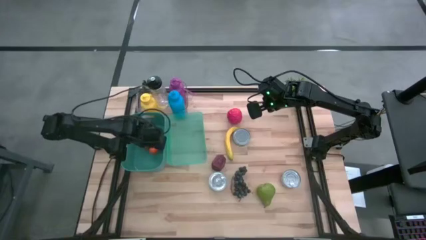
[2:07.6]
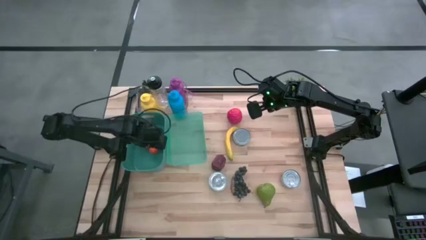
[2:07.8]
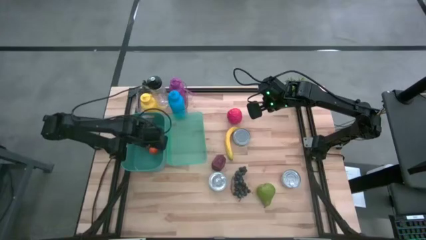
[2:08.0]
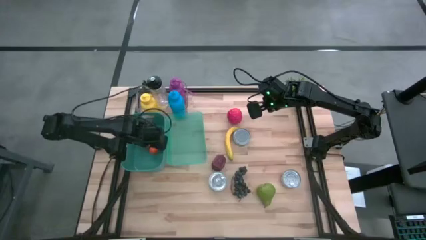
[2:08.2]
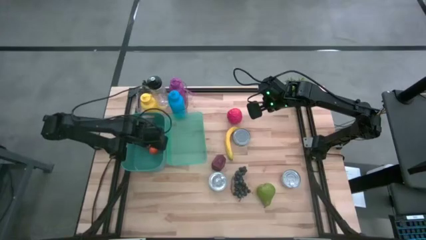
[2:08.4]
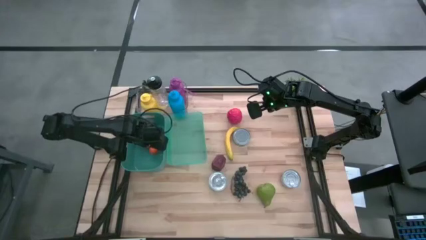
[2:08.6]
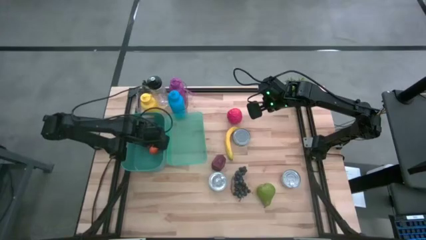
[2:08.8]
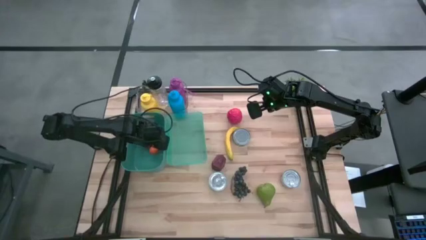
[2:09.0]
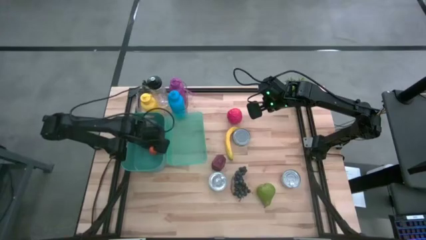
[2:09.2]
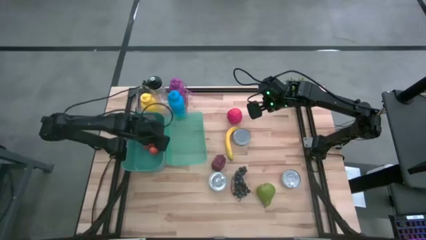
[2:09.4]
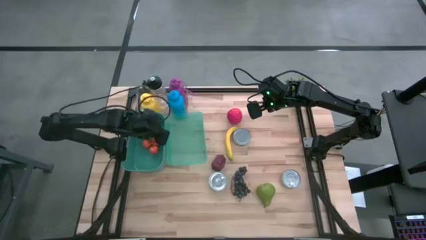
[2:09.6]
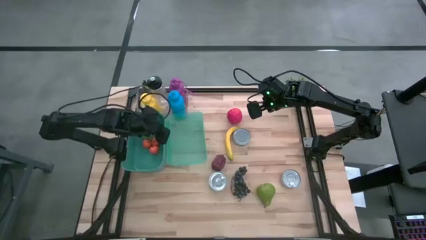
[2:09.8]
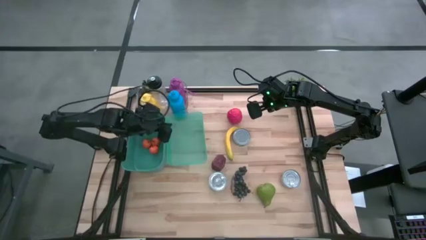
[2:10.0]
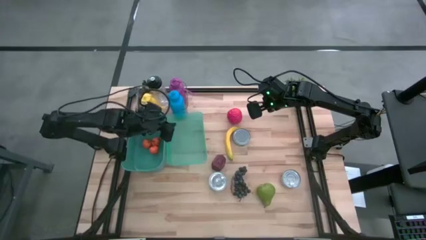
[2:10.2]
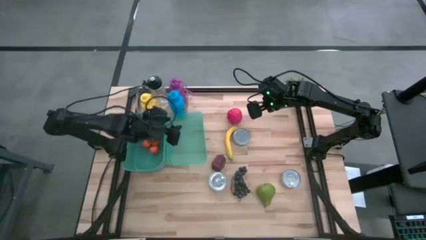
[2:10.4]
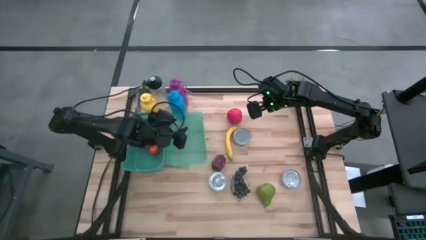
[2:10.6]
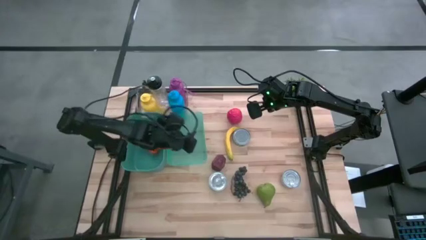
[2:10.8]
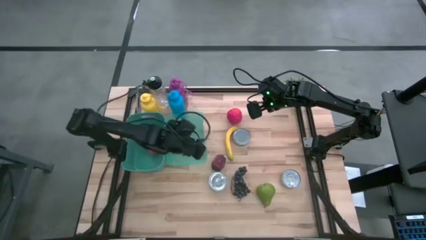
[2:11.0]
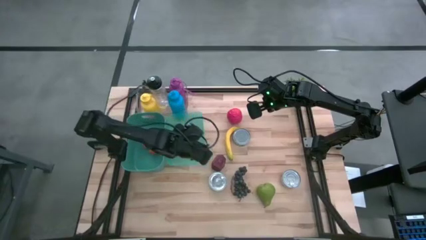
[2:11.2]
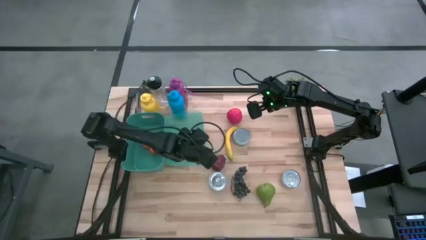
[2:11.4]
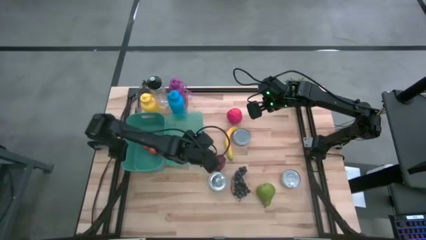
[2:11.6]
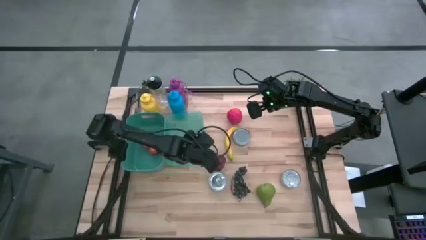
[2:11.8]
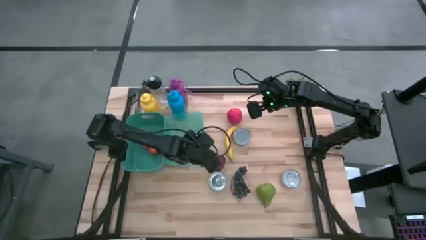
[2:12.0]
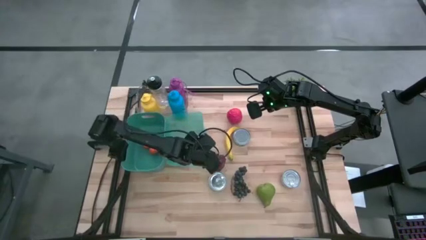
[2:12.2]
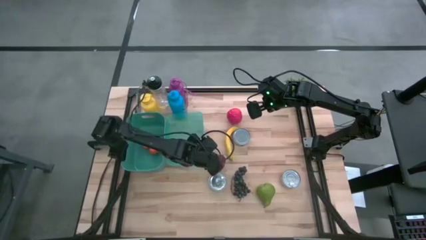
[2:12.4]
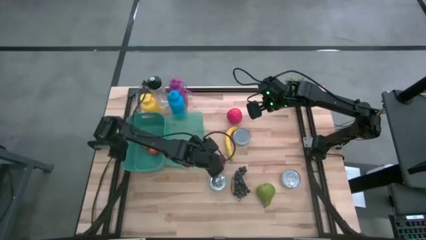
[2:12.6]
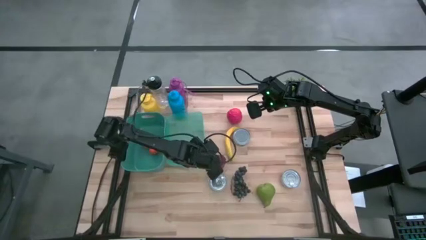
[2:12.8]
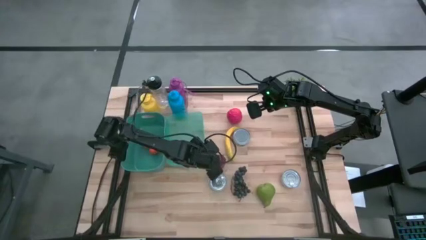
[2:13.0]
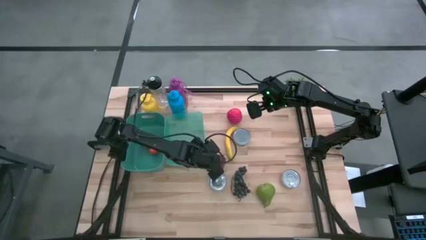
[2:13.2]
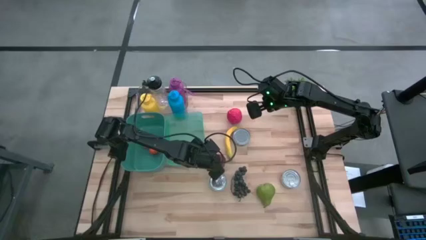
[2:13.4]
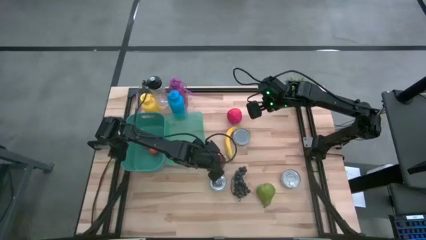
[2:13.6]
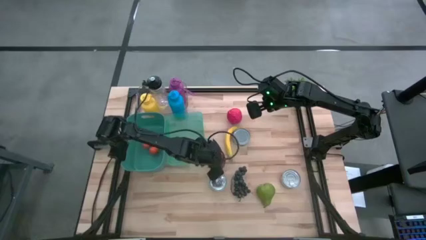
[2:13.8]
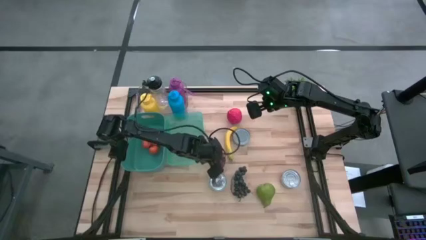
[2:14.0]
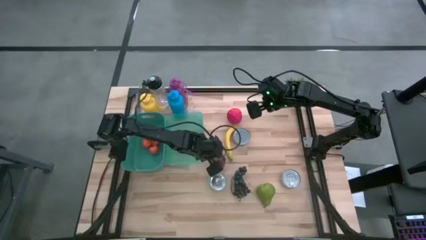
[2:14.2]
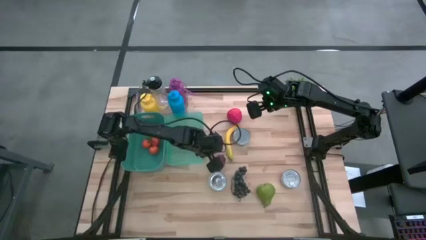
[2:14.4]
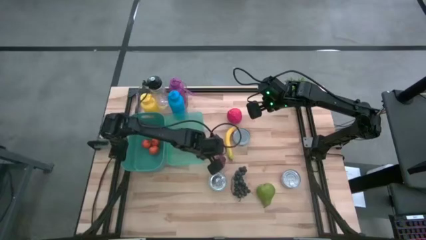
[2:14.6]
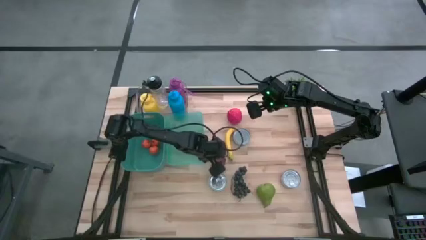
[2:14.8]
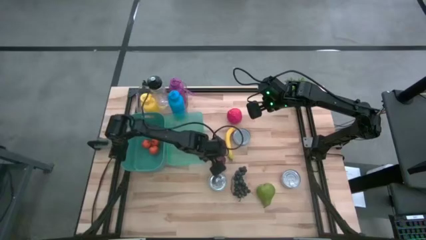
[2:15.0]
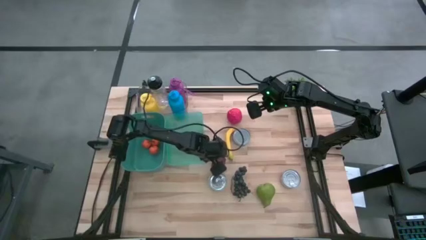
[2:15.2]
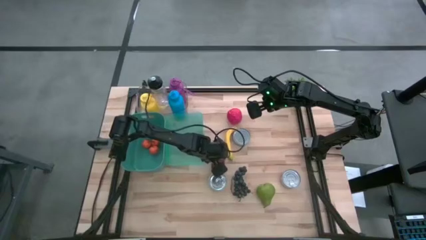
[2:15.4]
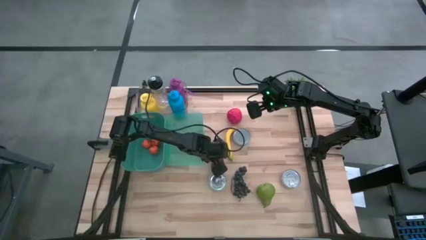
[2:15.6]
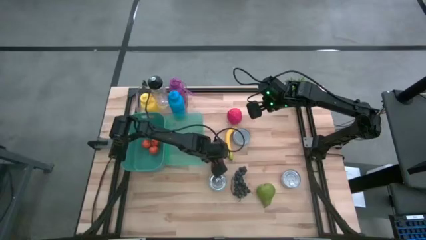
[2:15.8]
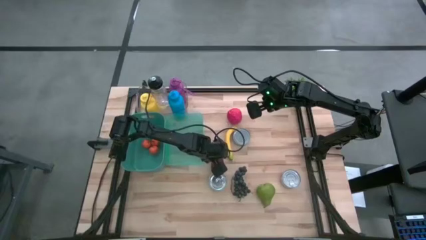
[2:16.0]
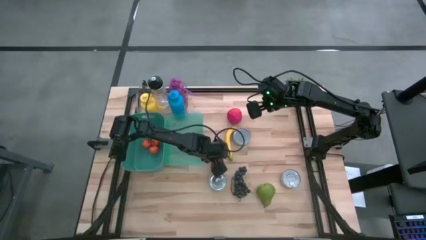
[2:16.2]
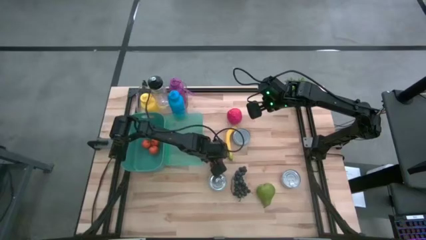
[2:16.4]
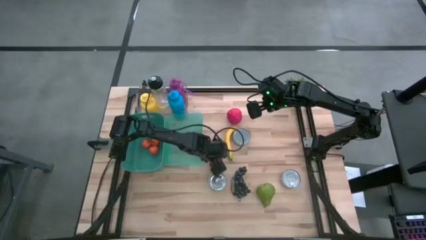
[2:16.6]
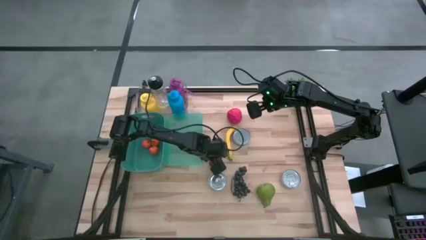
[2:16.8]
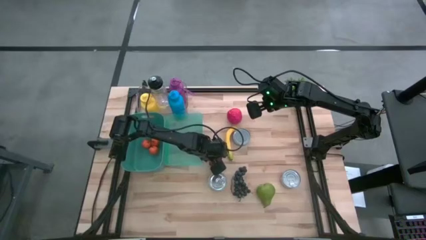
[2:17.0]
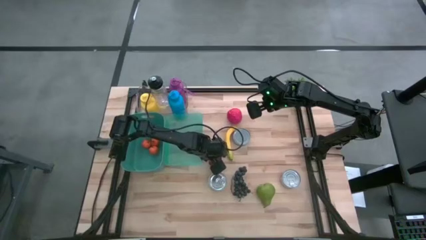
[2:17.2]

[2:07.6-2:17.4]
Task: Pick & Place Food Item
Put the dark red apple into the green bin

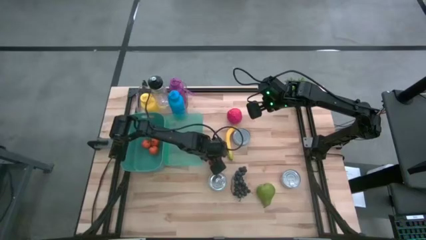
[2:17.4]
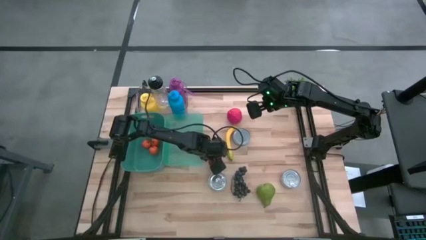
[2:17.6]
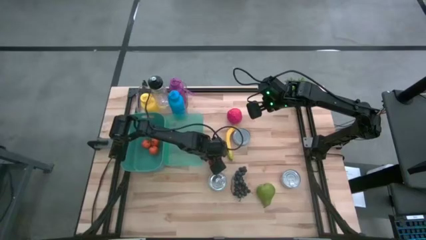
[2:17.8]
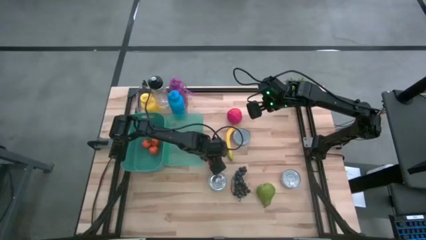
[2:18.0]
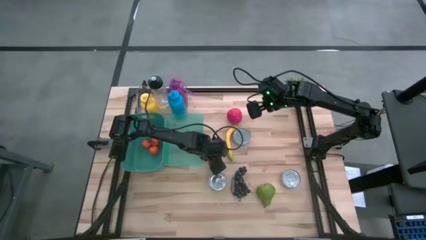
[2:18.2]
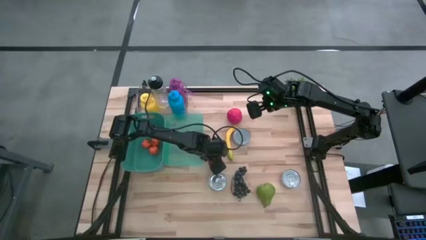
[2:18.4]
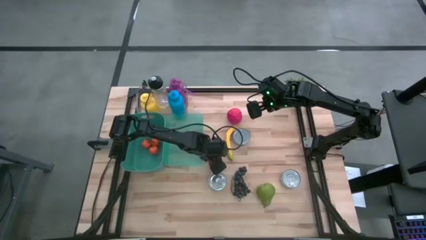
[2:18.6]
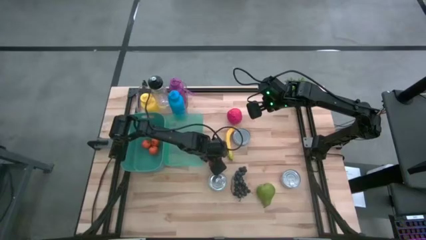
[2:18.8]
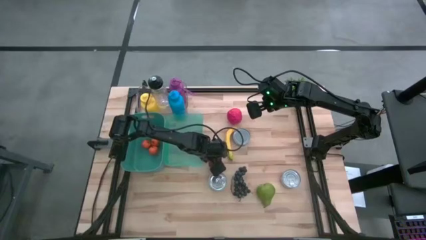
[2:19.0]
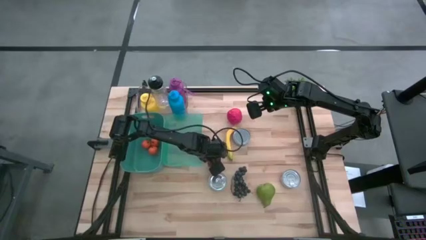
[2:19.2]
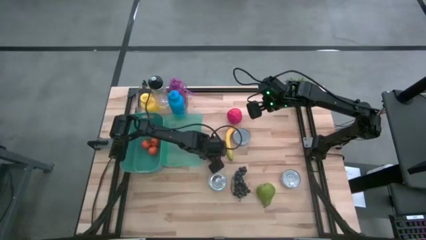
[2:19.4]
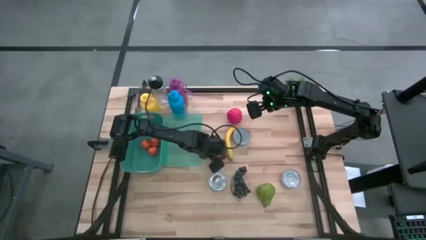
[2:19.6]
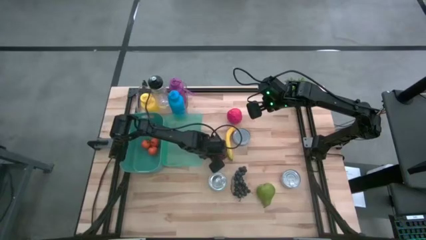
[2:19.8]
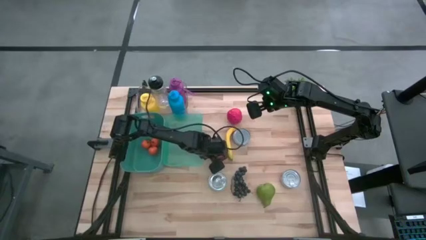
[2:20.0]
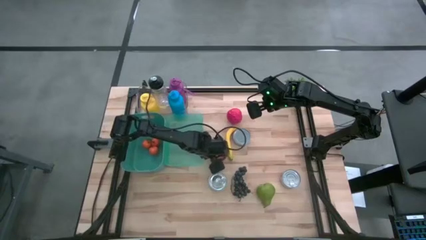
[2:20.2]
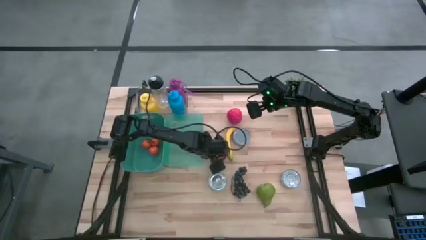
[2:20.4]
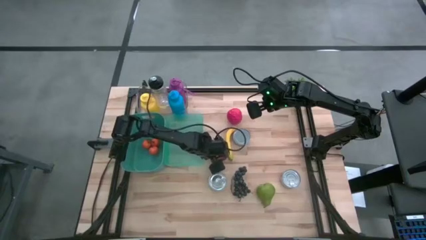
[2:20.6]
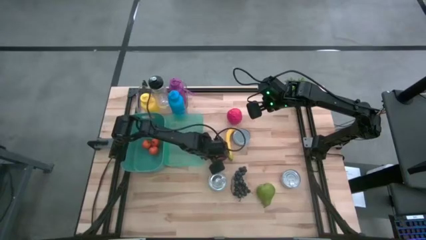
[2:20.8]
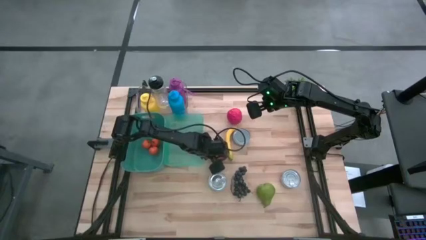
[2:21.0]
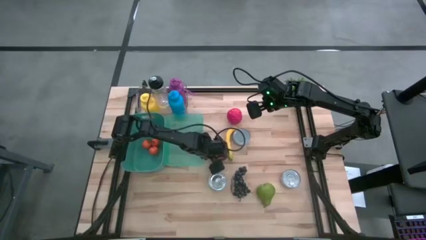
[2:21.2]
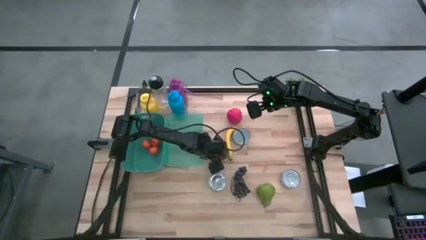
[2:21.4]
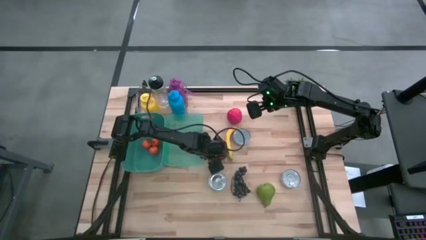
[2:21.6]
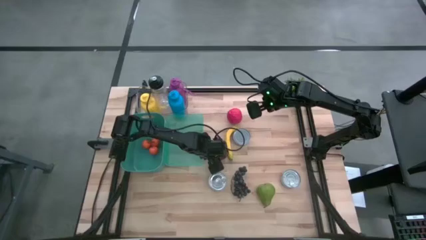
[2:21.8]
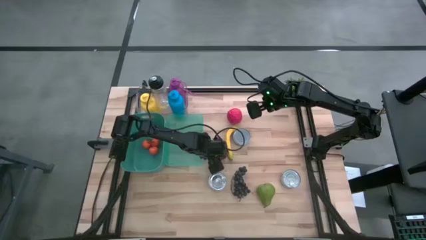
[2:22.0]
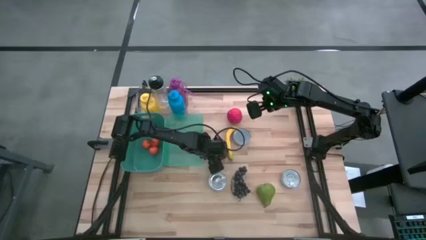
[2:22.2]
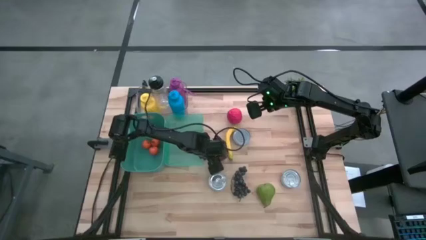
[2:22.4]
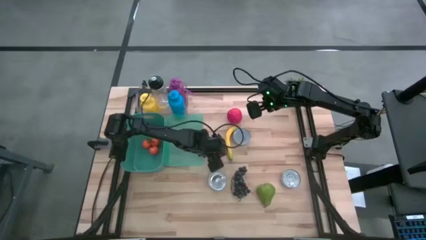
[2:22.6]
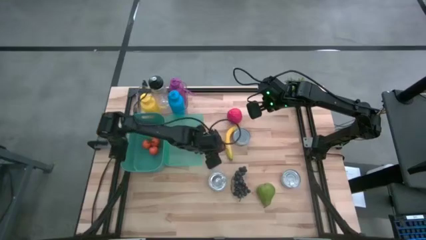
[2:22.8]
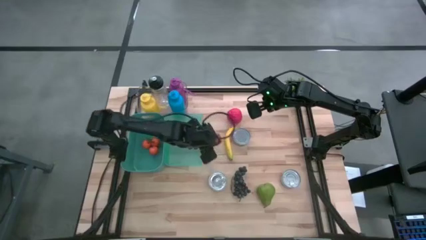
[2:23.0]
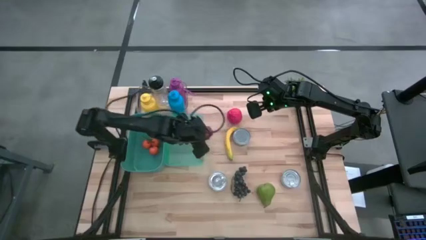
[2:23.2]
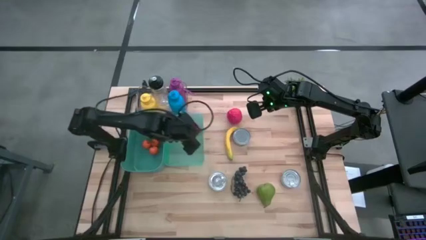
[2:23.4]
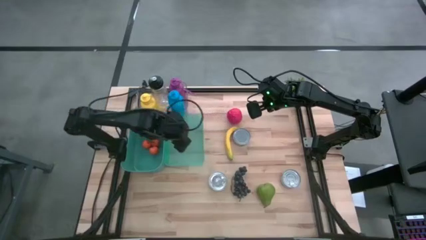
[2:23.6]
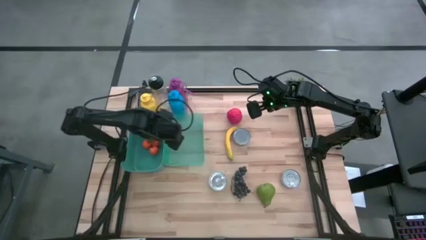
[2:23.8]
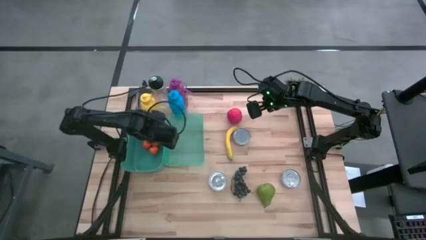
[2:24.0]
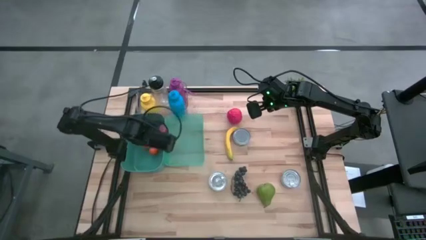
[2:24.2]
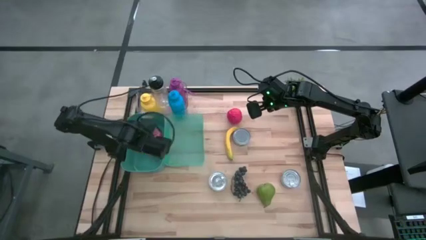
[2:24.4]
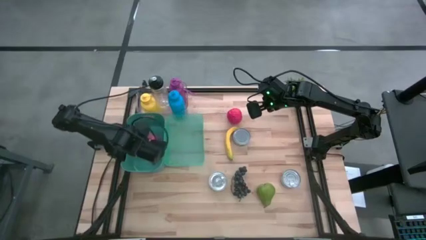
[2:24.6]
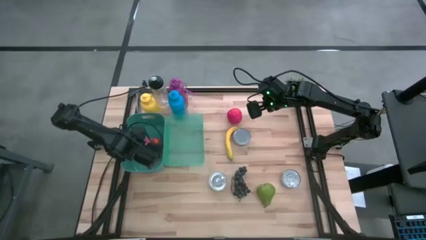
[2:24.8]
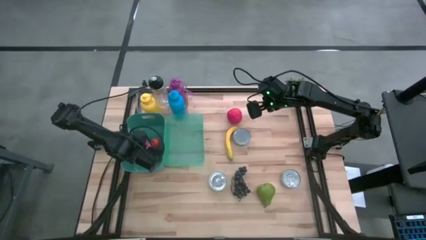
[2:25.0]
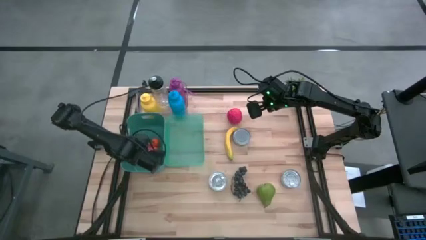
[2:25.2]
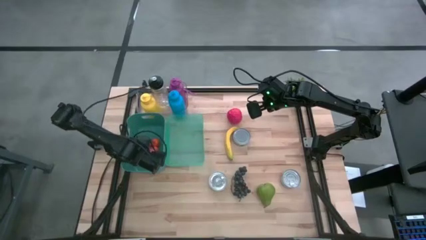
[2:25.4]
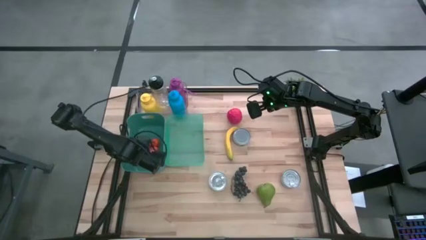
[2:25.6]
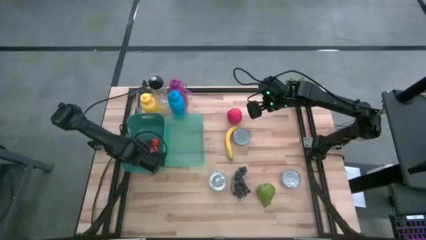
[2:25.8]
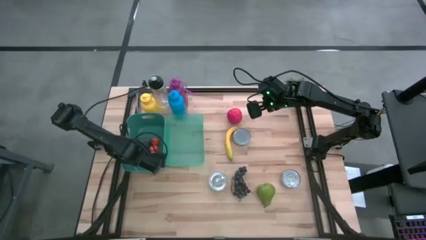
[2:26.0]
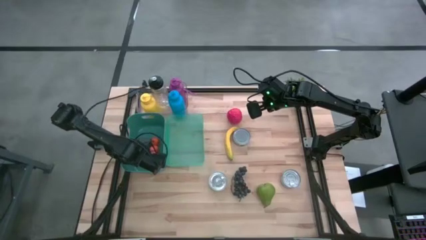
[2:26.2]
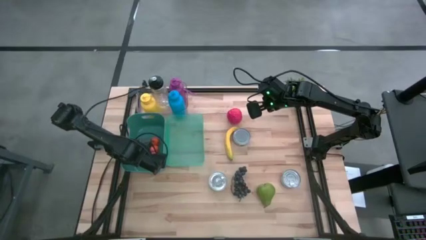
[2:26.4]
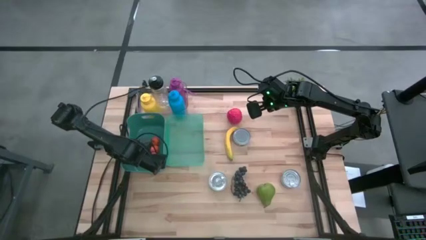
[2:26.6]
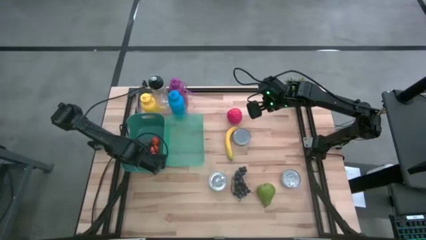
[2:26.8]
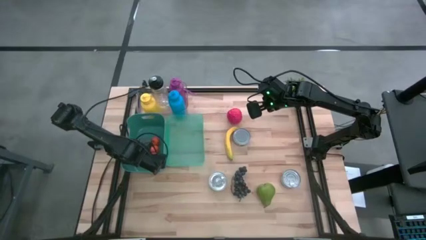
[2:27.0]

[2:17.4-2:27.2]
Put the dark red apple into the green bin
